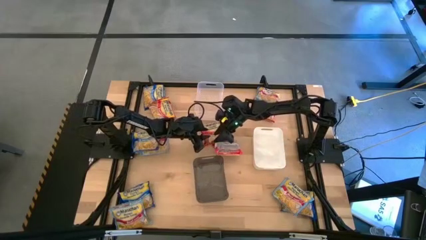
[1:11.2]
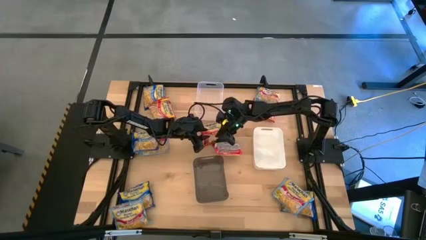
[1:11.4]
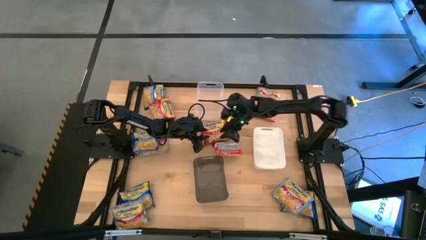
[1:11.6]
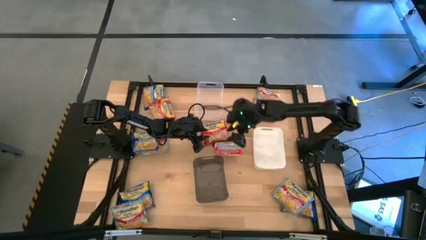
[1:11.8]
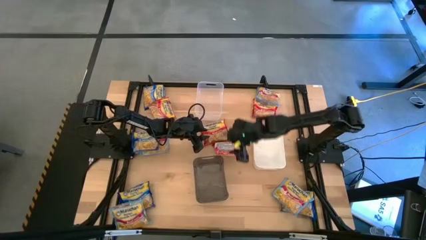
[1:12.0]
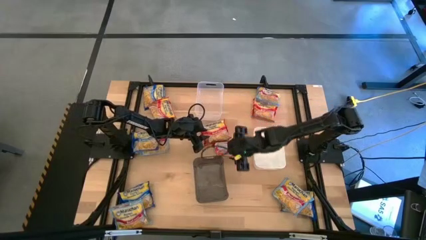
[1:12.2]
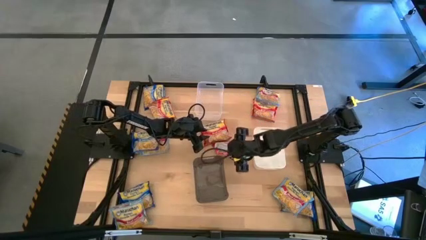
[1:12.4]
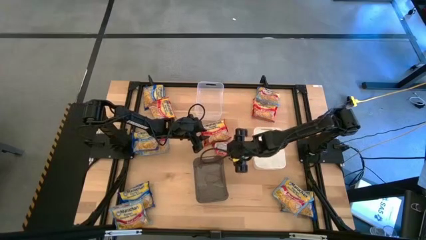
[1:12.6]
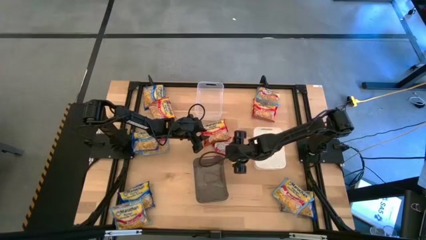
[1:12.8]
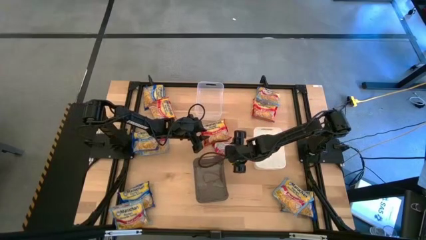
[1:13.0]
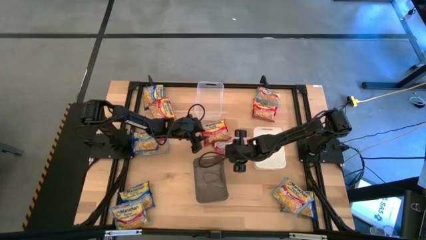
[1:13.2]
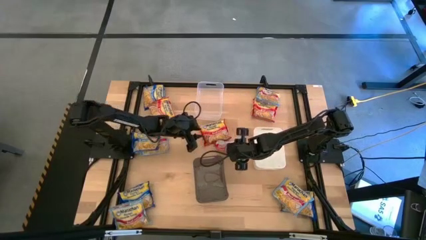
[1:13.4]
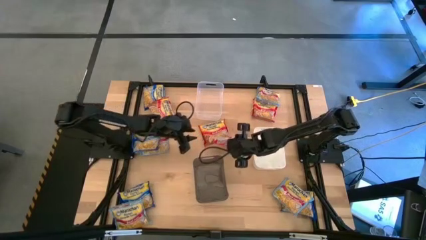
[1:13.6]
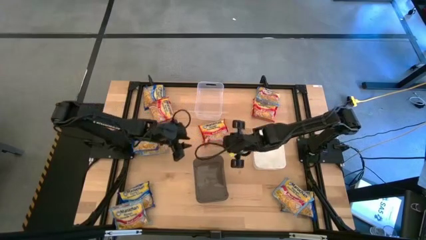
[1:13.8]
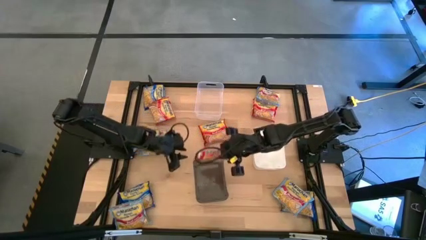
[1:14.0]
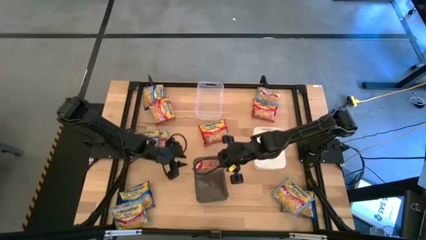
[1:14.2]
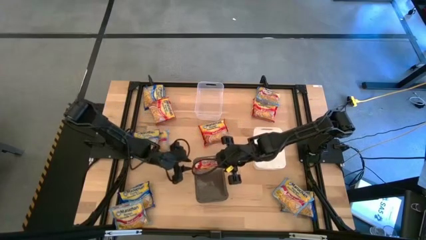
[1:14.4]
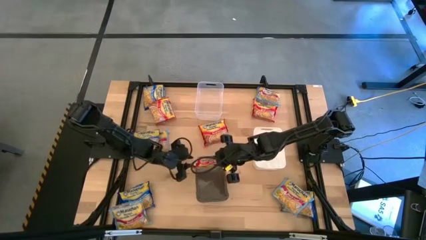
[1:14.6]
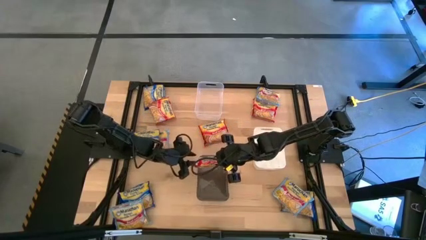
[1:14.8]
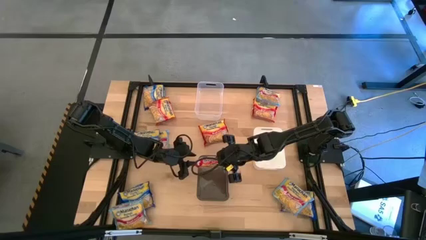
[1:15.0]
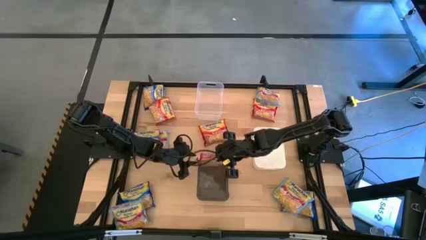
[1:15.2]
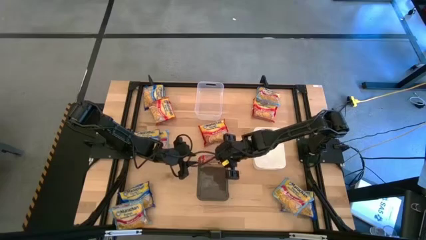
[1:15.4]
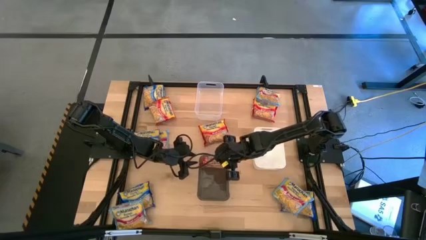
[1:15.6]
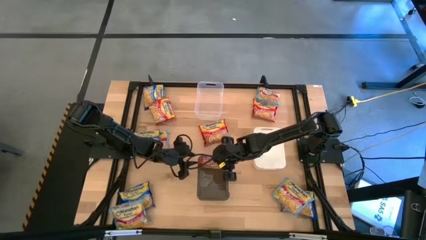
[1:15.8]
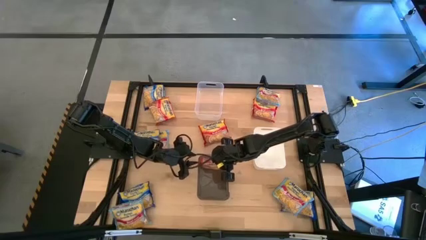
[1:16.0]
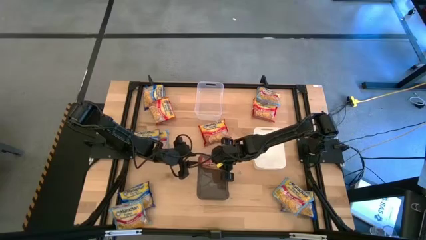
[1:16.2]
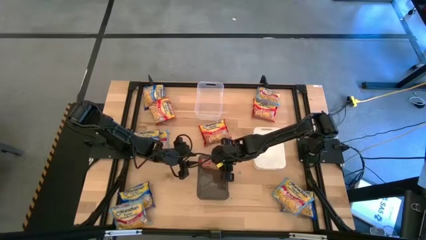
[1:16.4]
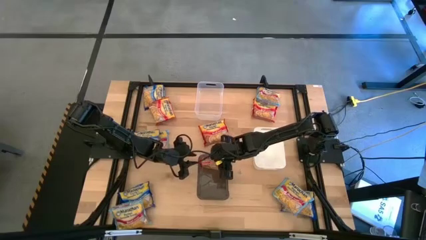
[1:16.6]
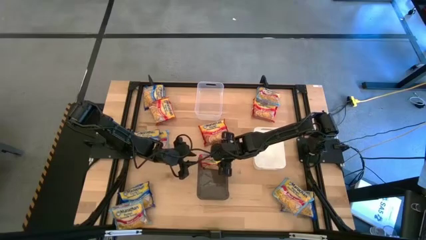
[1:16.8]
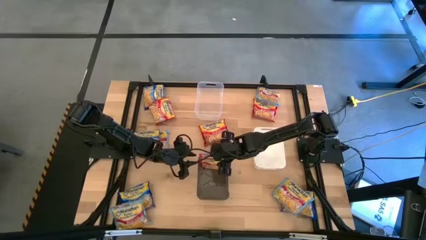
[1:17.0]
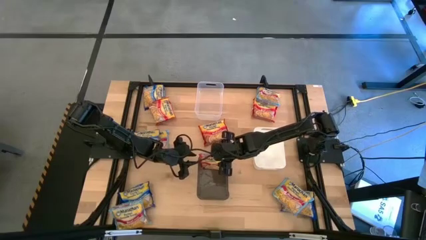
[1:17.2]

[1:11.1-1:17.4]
Task: Sort Maruchan noodles
Put the red noodle pack into the gray bin

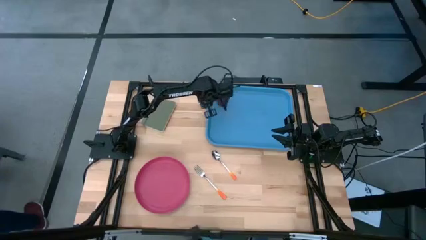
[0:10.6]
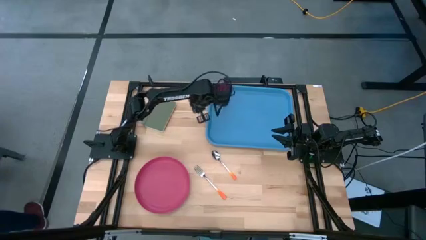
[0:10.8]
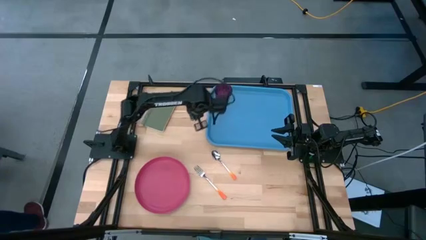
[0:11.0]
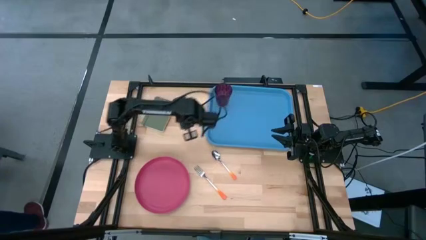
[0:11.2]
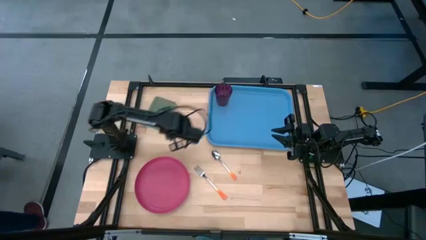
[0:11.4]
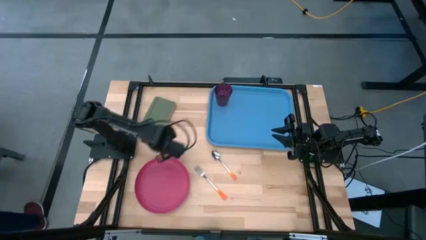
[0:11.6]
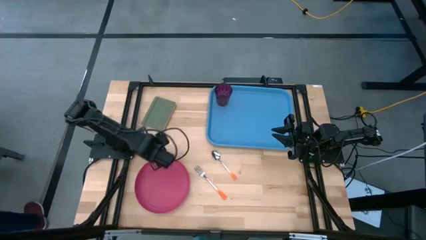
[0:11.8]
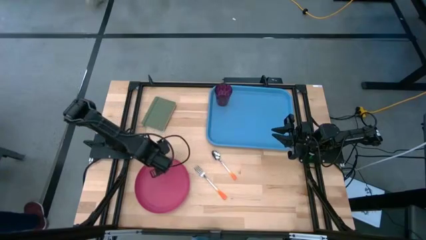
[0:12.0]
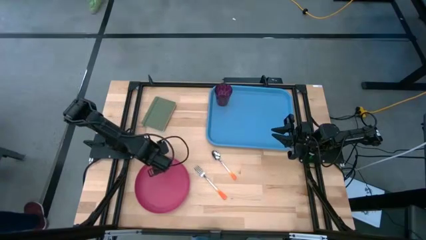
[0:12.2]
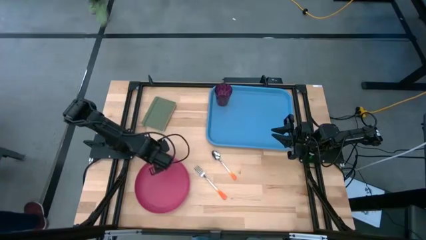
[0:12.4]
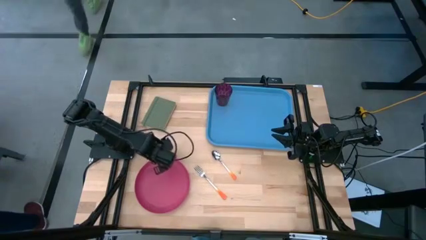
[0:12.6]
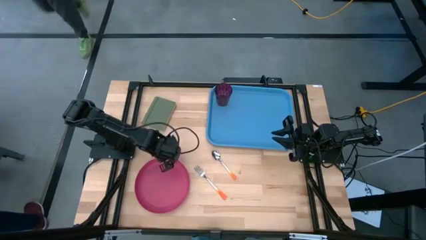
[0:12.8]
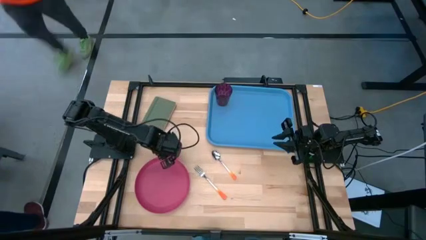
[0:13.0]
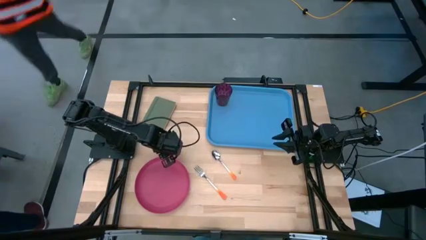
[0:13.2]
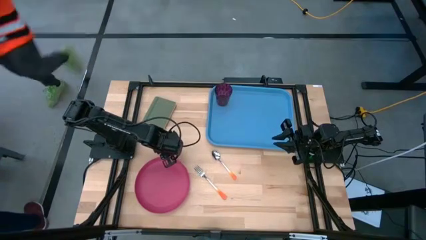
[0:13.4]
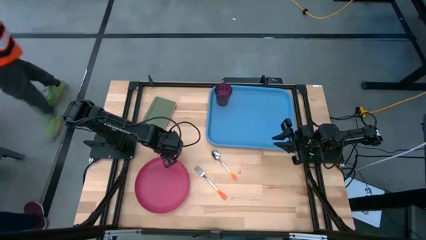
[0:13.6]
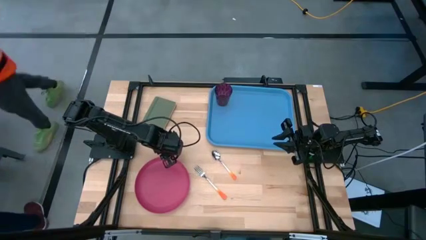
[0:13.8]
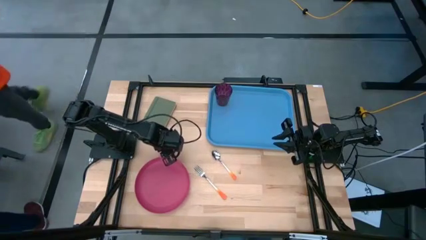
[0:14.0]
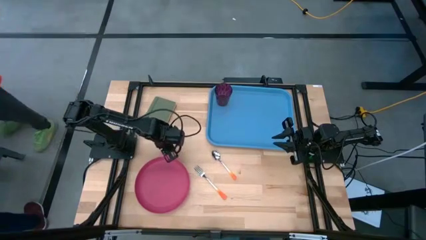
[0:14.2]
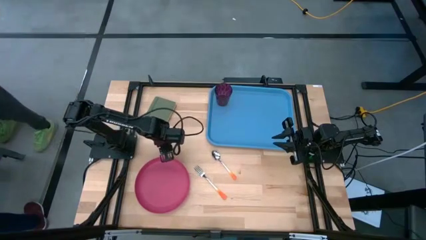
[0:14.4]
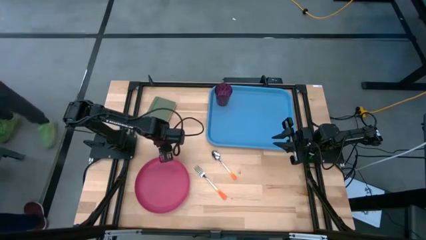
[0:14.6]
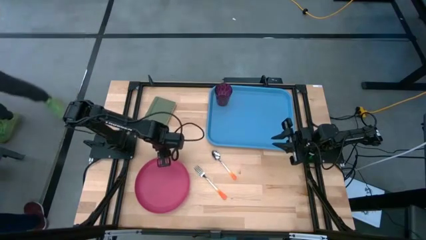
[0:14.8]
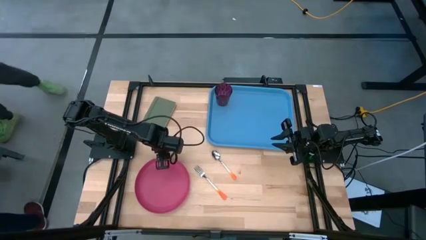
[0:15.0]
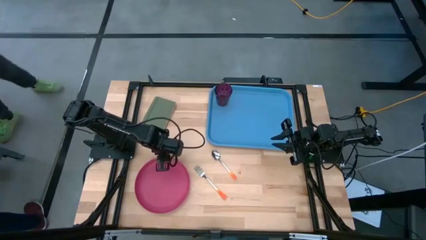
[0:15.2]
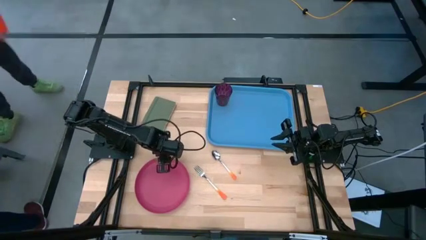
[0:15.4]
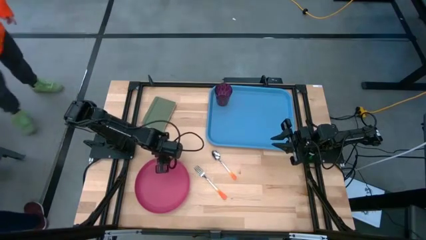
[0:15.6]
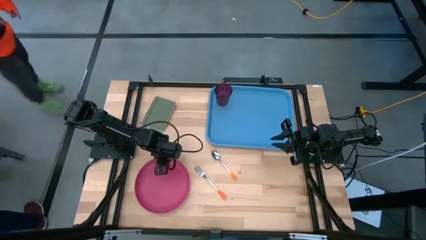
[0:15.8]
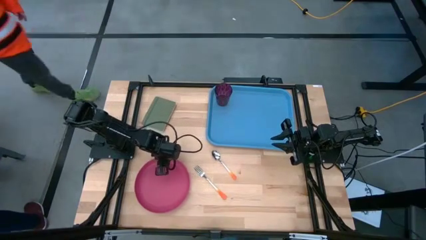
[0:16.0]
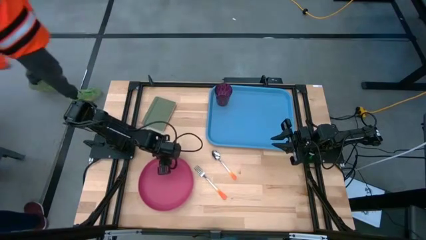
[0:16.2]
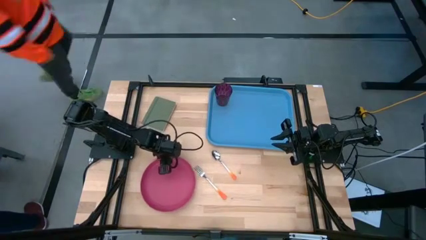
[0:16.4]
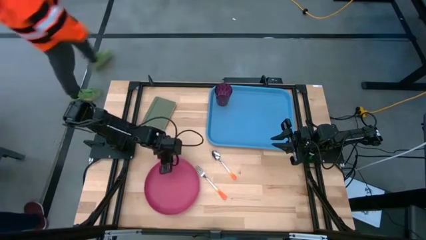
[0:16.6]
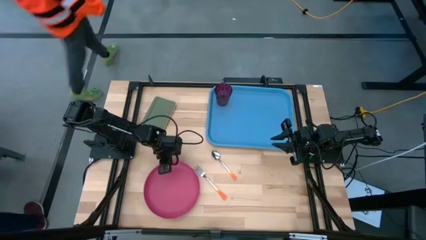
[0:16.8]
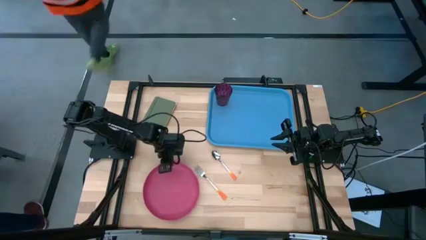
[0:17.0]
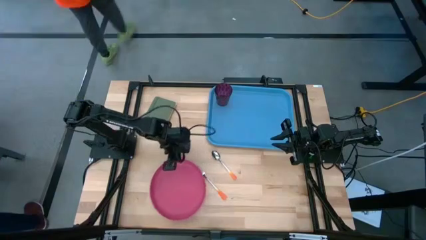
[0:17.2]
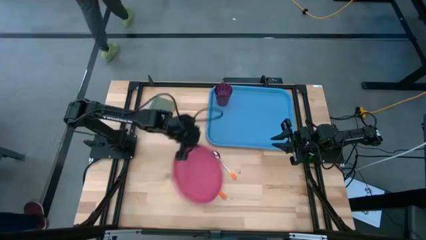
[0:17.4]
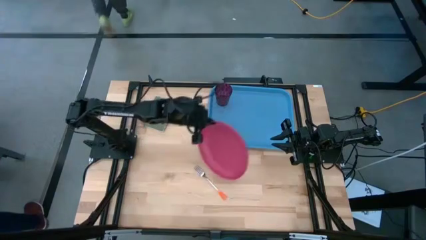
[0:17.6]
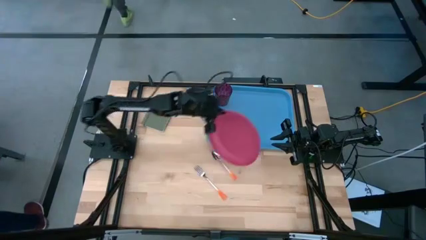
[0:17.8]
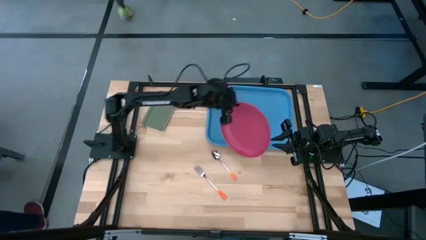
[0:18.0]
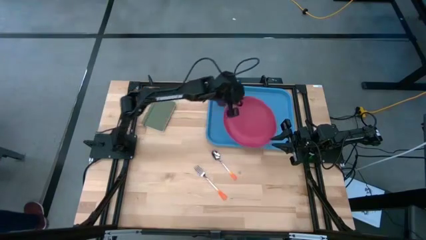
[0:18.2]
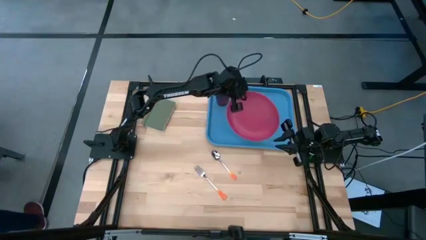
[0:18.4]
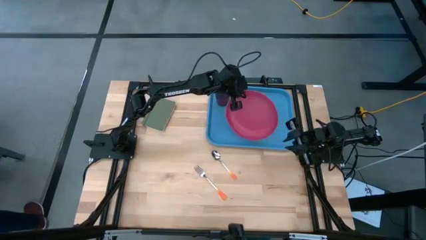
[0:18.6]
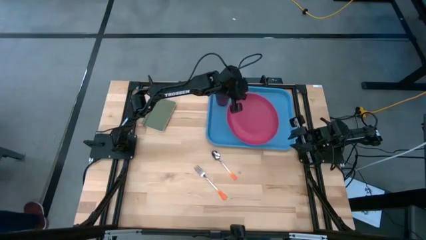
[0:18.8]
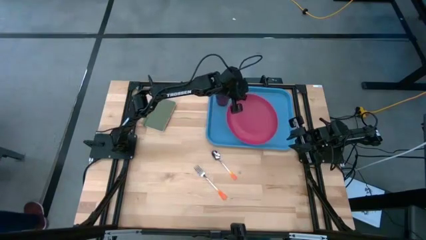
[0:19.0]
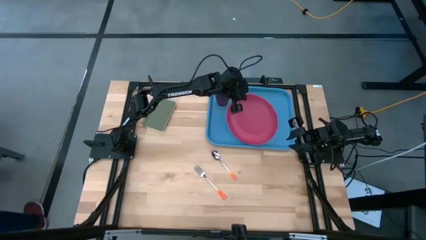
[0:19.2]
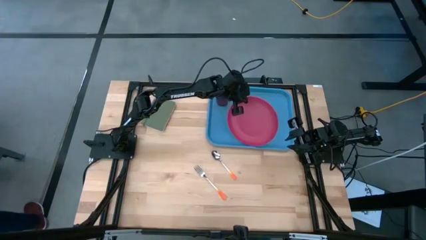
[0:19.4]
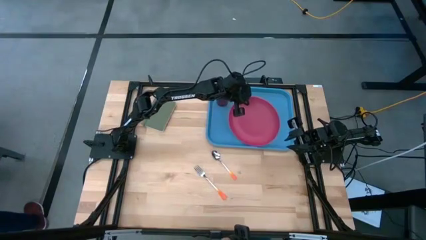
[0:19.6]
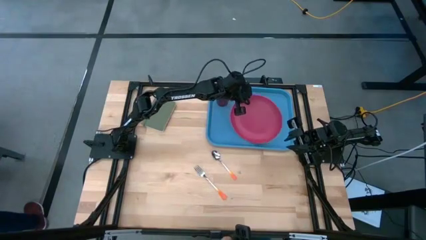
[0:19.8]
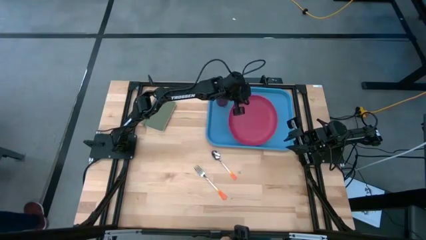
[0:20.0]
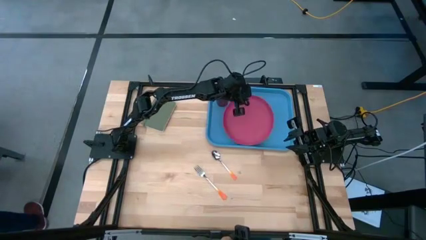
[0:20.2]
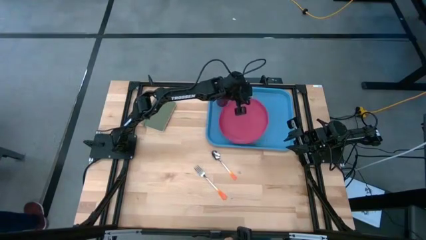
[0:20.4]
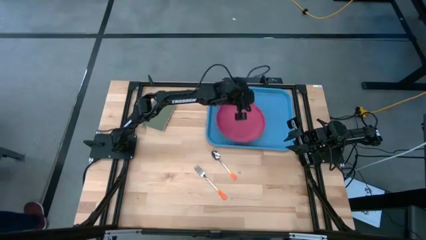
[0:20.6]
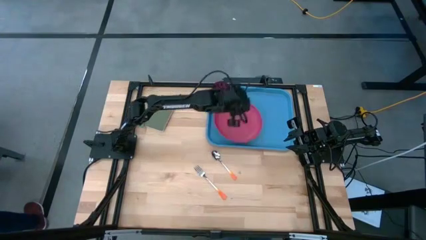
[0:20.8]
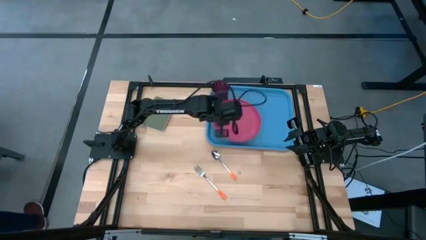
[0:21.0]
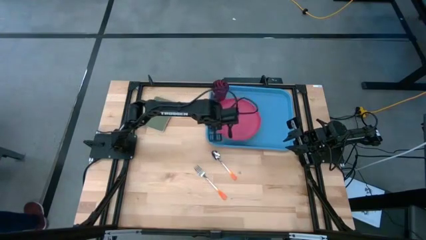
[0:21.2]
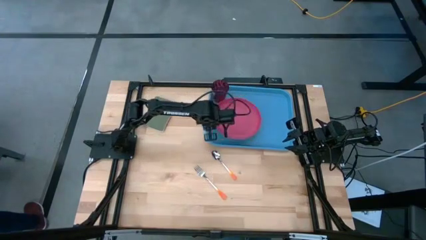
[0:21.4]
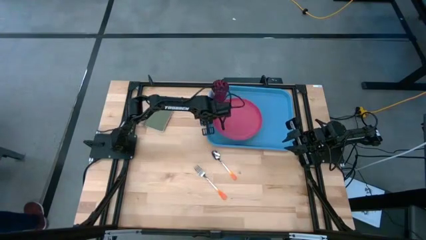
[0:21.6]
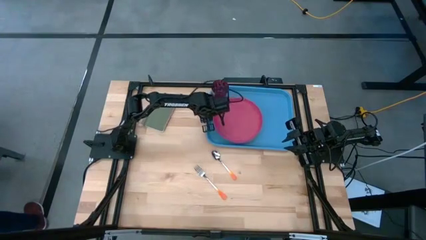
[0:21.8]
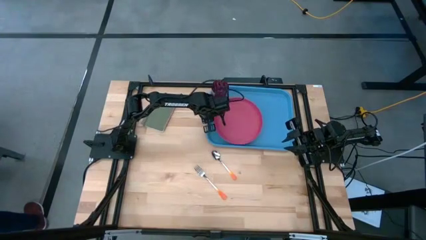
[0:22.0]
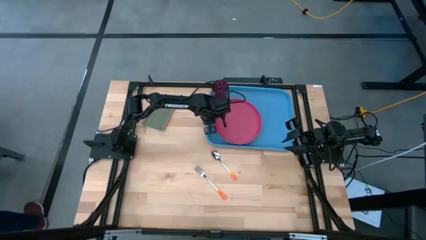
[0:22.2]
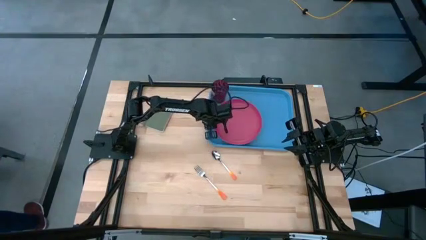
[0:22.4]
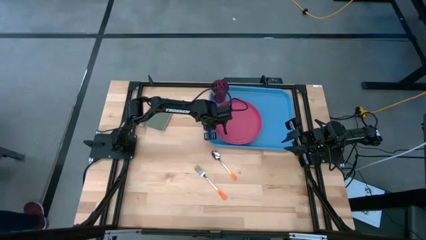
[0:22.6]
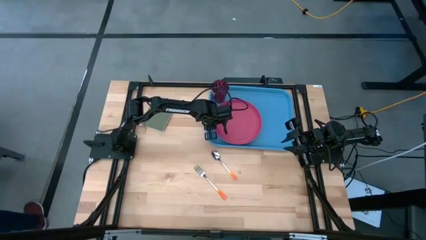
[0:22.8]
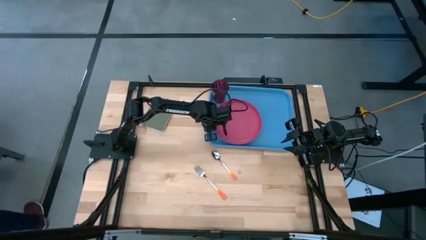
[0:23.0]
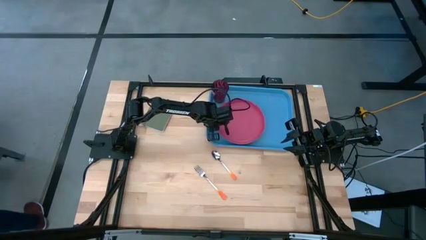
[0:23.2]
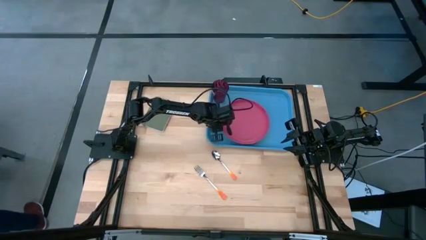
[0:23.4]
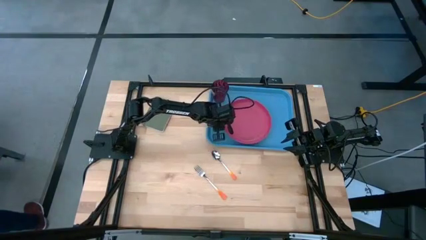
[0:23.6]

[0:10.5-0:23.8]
Task: Pick and place plate/cup/fork/spoon on tray
Put the pink plate on the blue tray to the bottom right of the red cup
